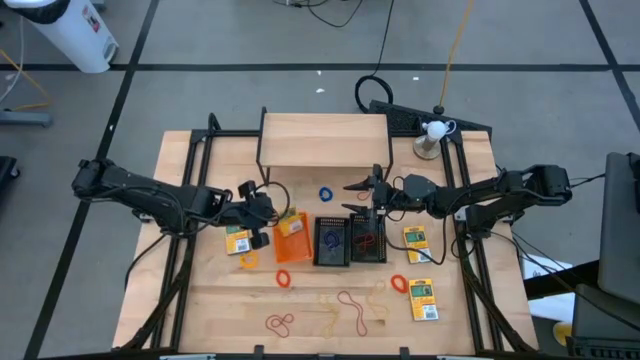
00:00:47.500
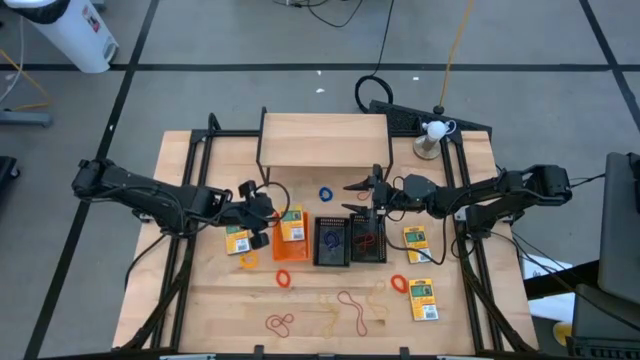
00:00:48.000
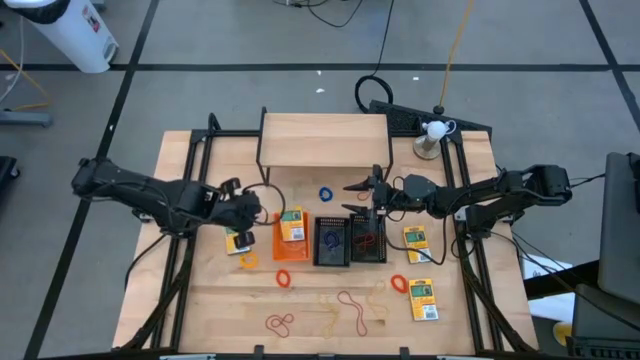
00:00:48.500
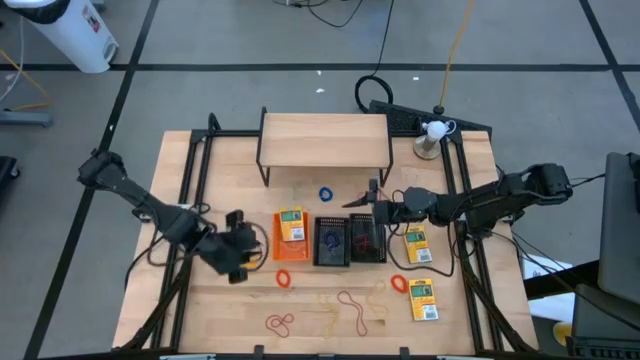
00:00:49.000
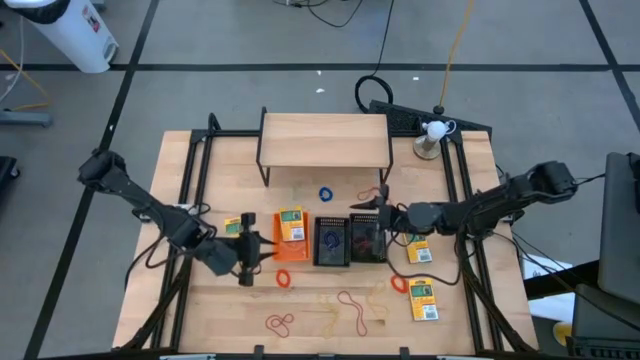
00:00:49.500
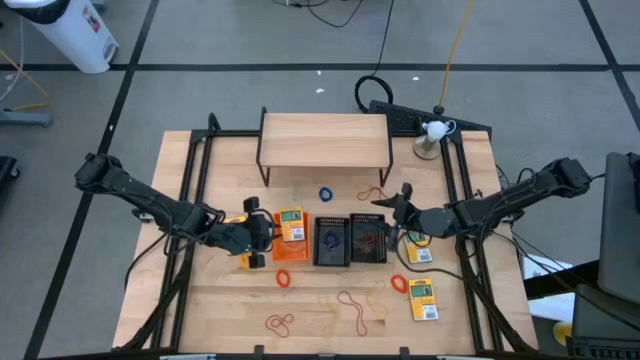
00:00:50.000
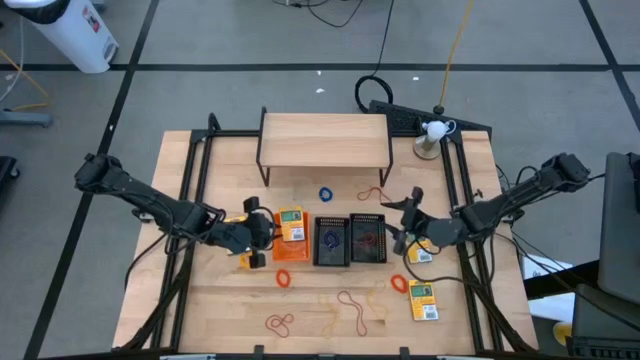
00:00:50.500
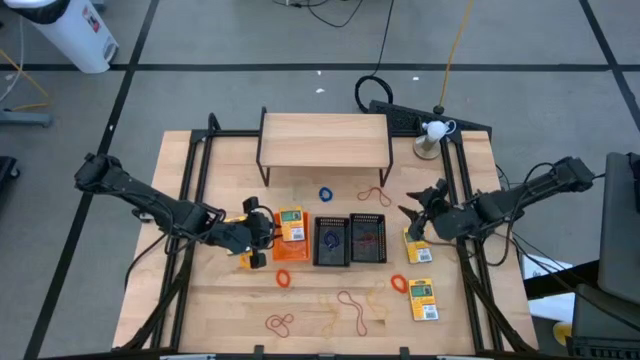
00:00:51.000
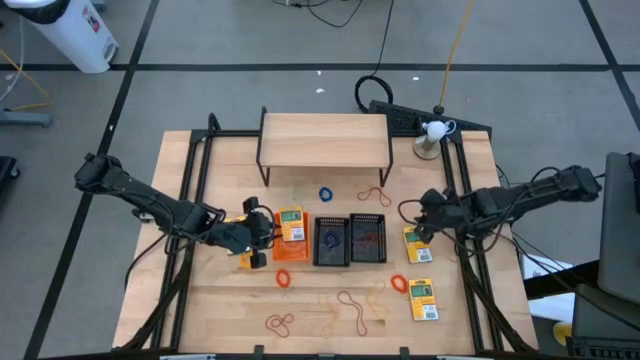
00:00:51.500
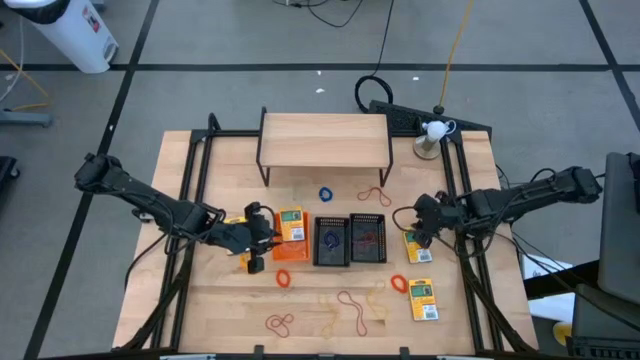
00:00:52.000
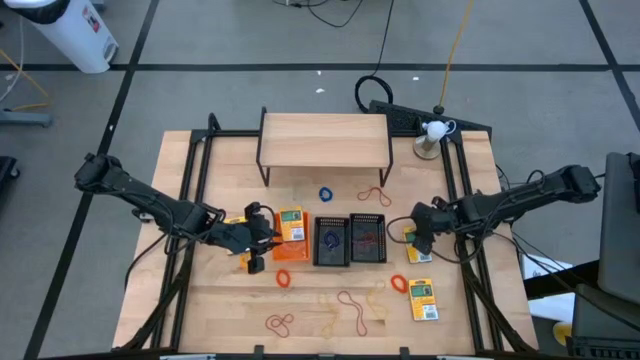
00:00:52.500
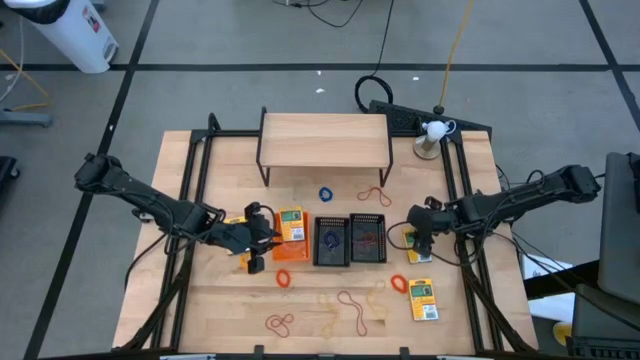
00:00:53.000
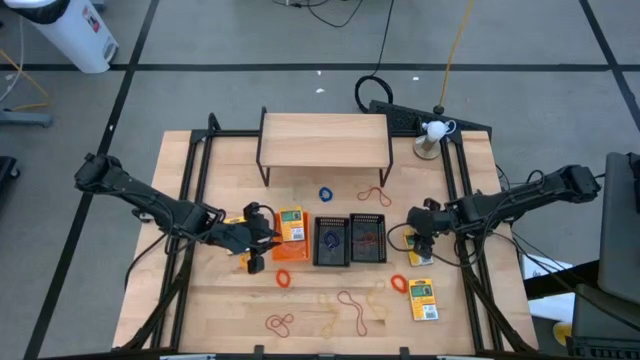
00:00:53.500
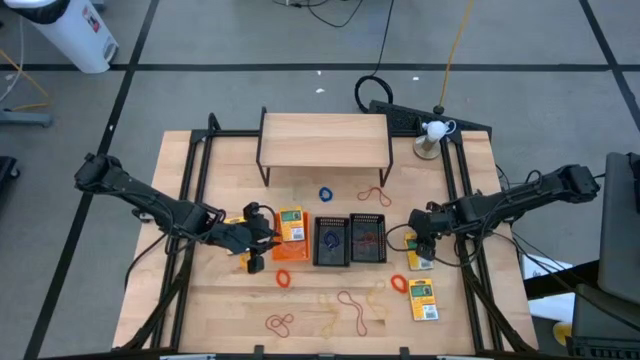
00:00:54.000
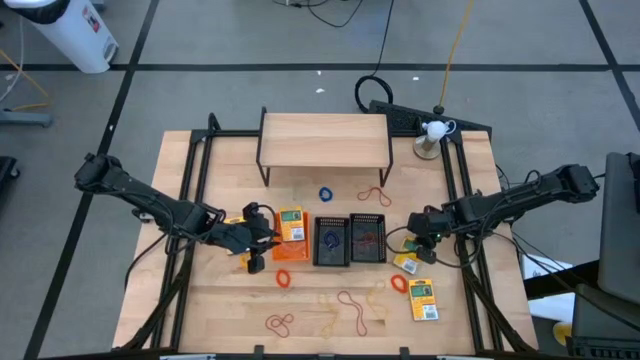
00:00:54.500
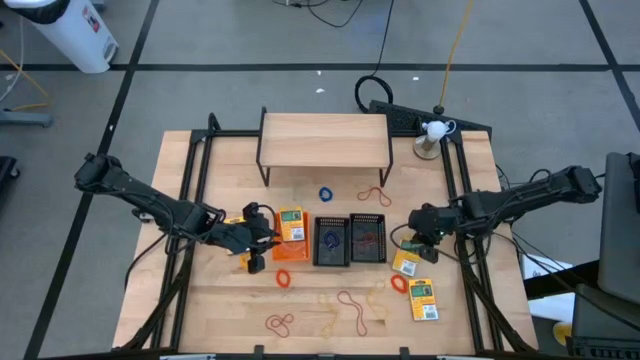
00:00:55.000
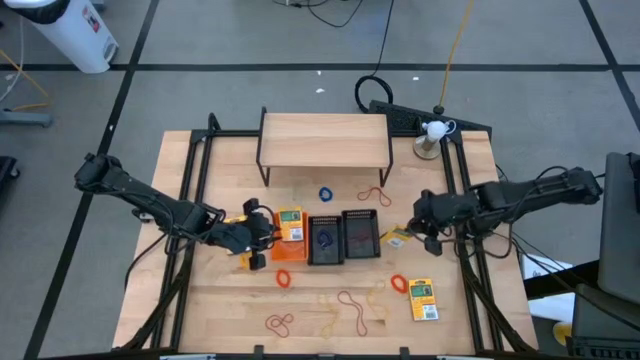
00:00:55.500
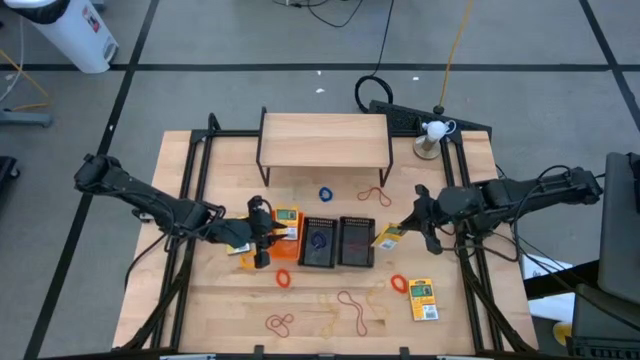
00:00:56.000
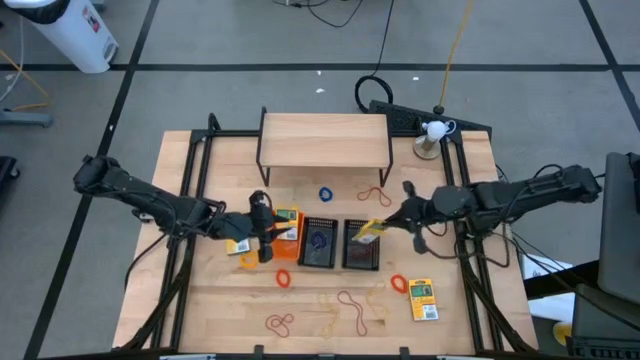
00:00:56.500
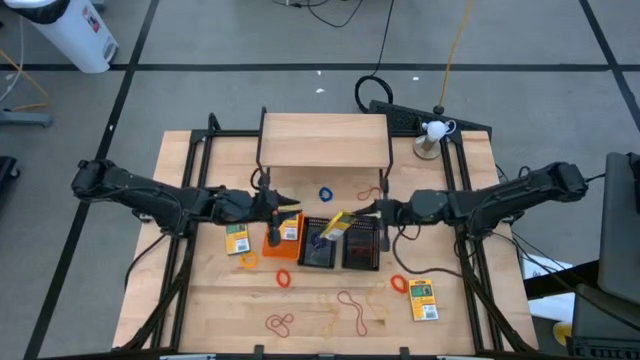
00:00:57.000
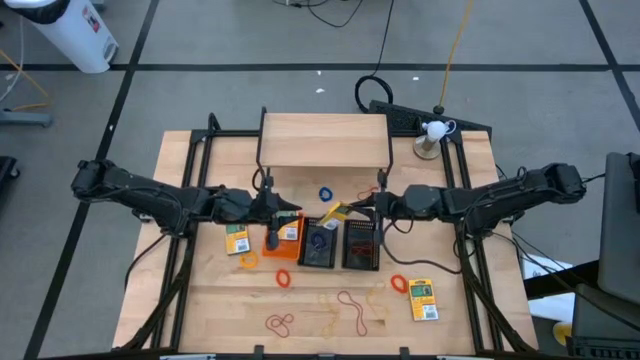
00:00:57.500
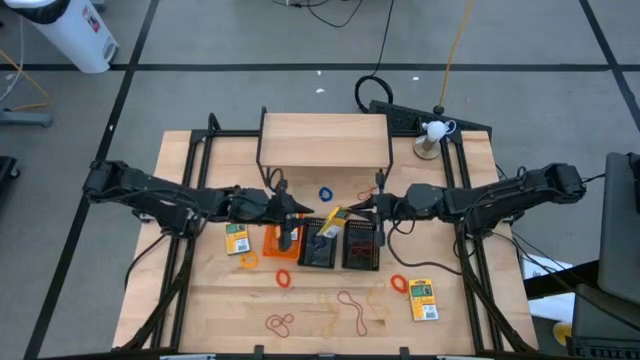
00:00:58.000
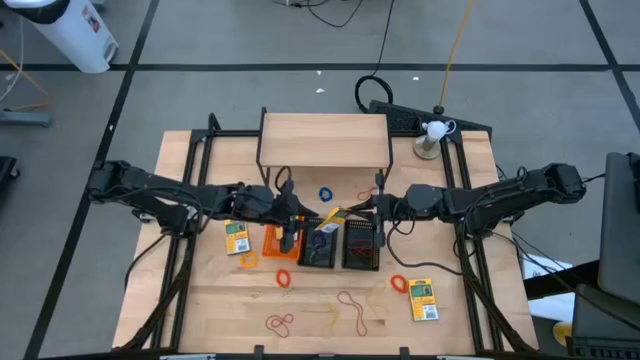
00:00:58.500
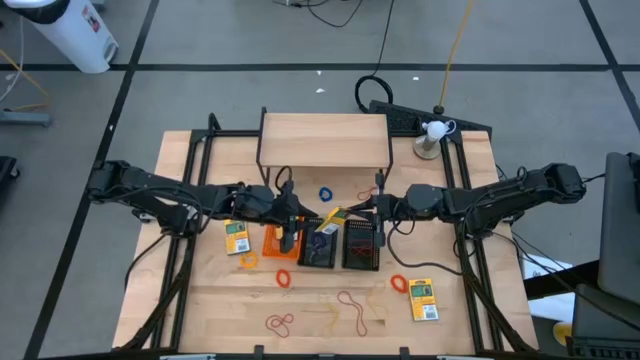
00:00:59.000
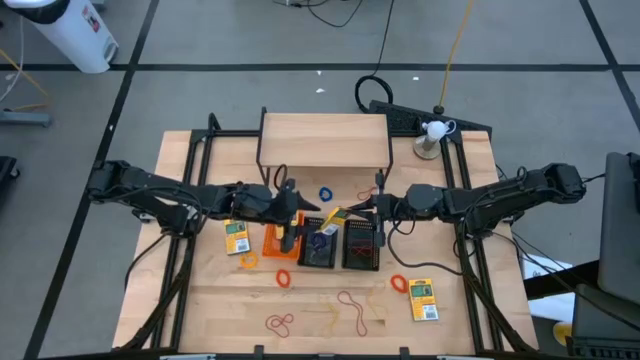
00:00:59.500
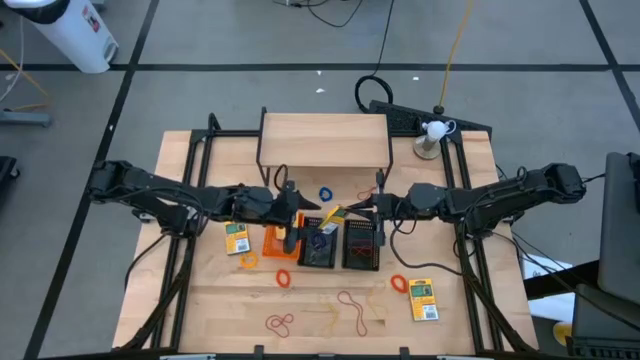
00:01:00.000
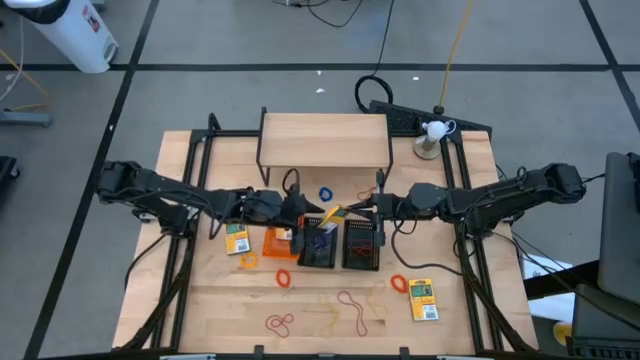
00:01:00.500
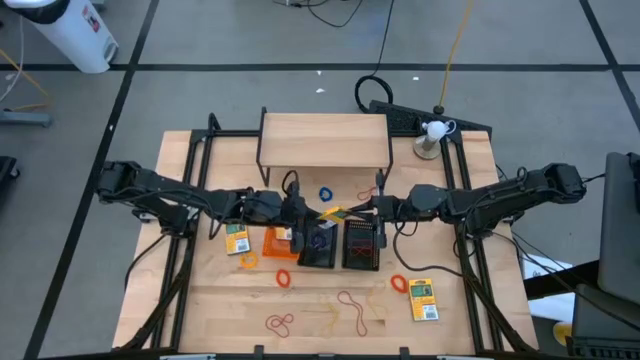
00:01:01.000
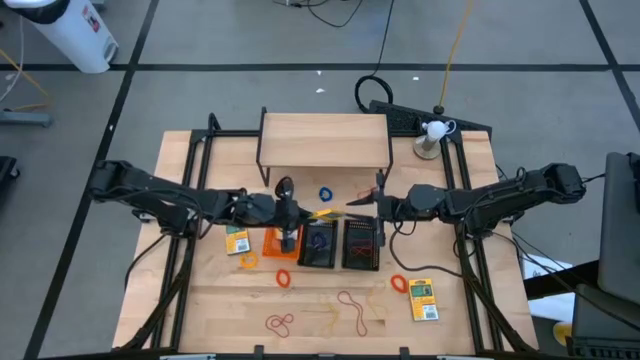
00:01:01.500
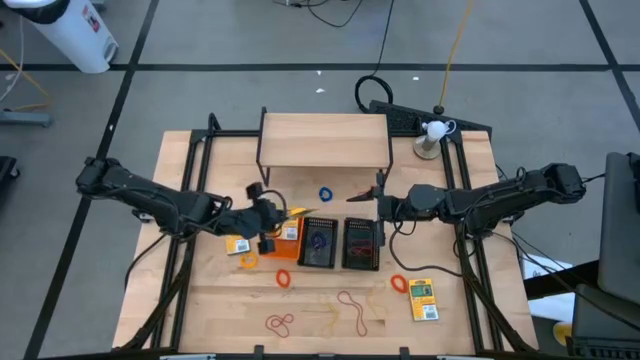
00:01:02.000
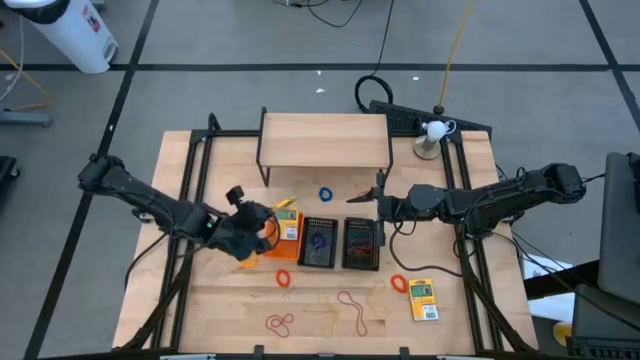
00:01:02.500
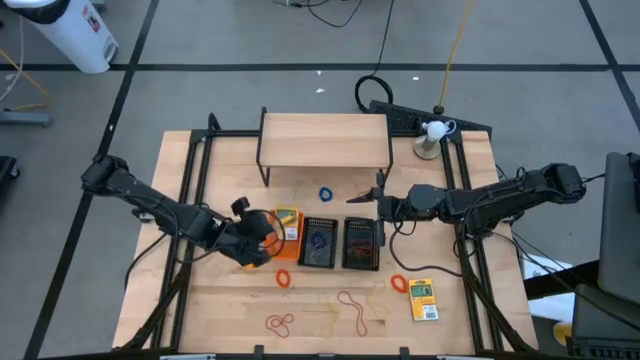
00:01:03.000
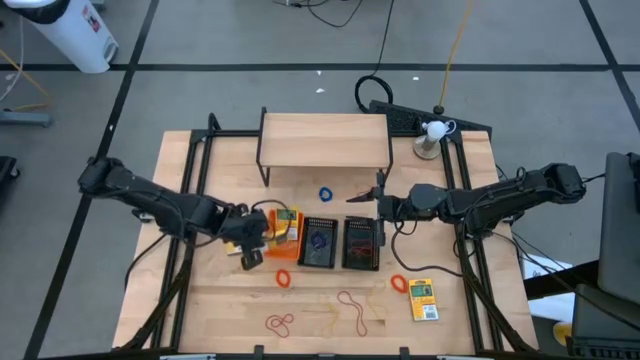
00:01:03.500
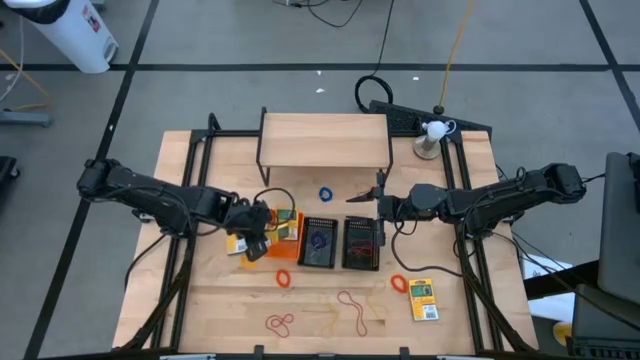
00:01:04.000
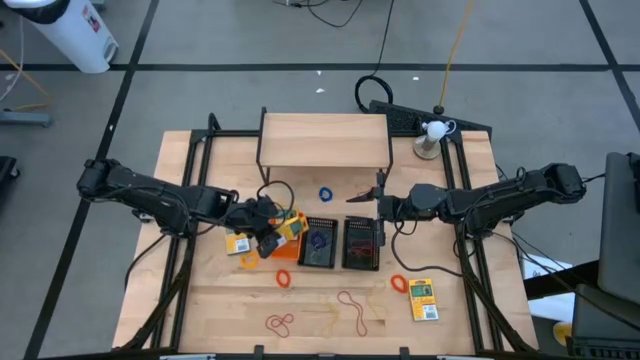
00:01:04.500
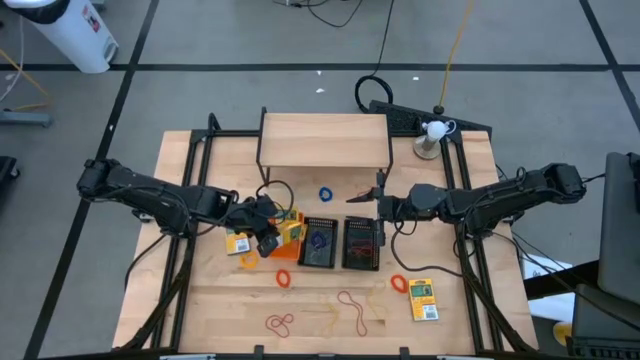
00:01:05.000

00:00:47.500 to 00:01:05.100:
Task: Pick & Place Office Desk Supplies
Put the crayons box into the orange bin

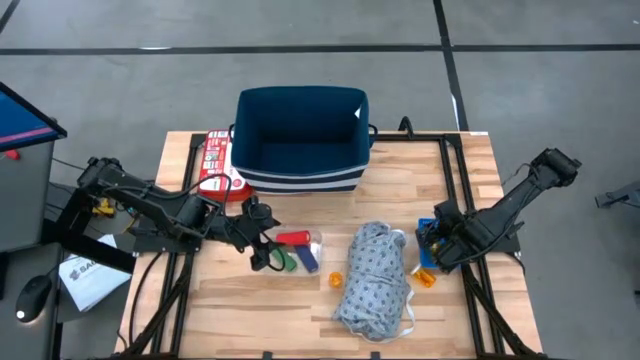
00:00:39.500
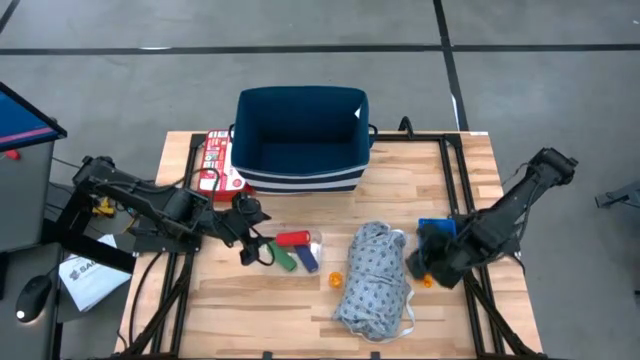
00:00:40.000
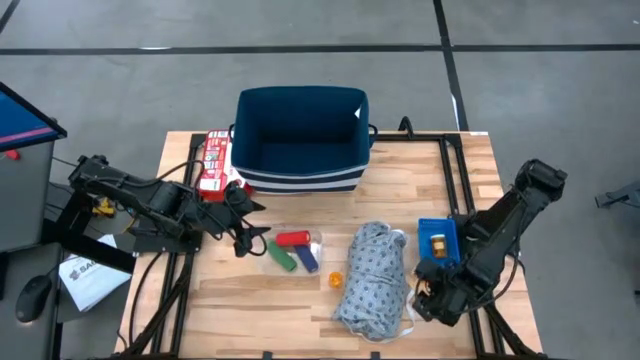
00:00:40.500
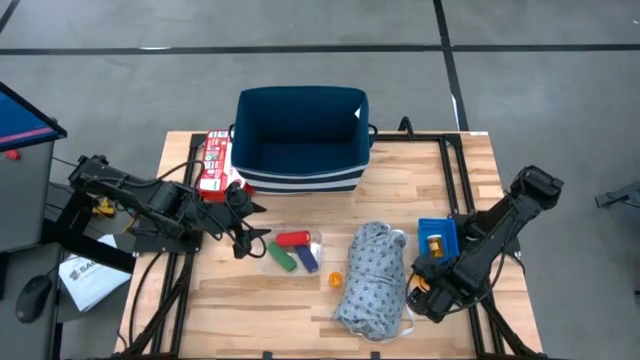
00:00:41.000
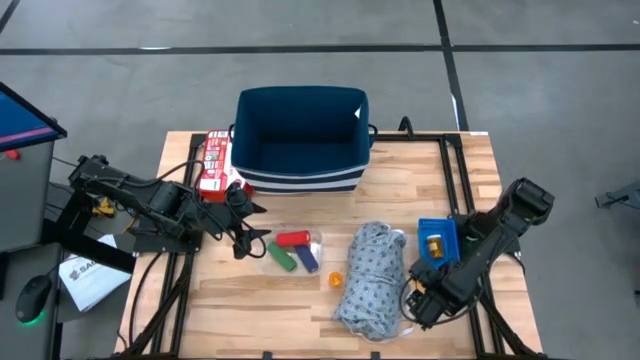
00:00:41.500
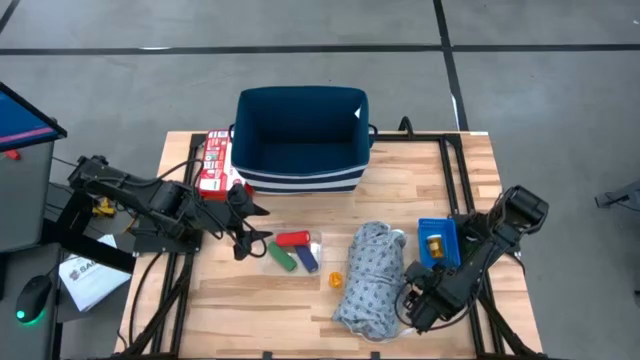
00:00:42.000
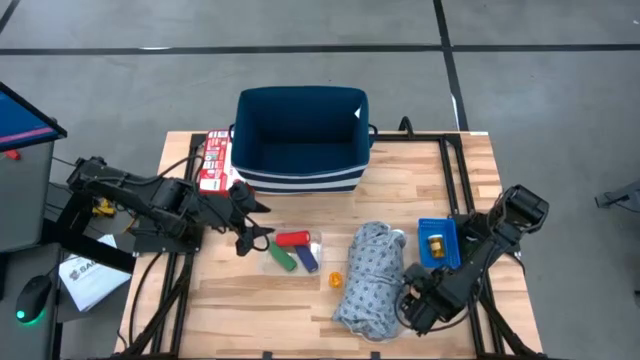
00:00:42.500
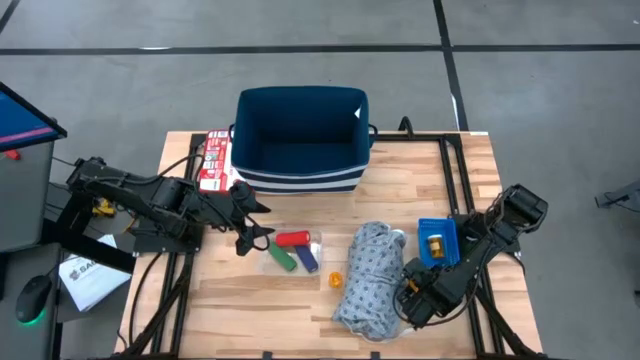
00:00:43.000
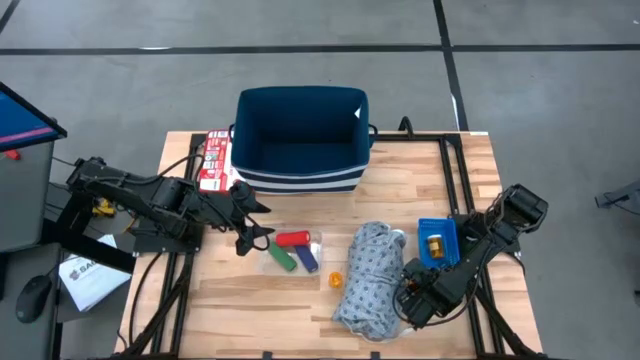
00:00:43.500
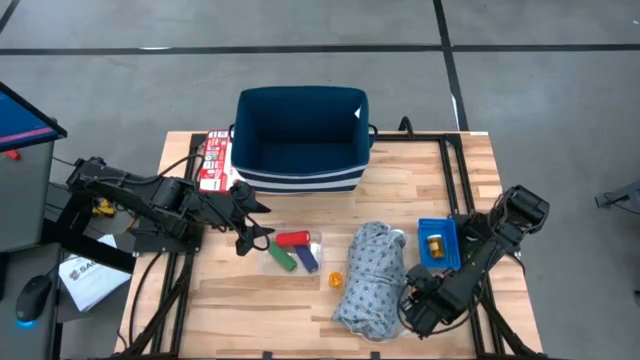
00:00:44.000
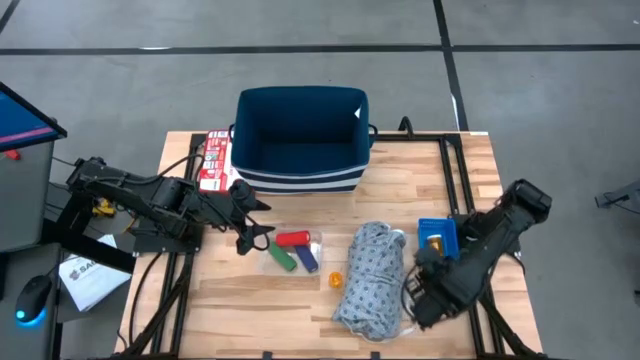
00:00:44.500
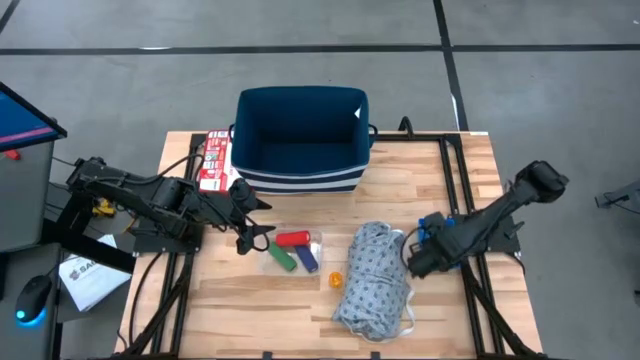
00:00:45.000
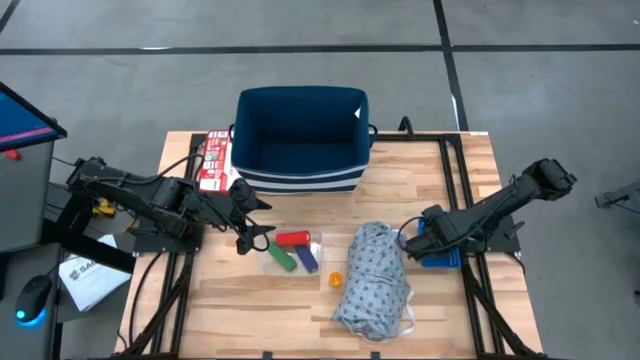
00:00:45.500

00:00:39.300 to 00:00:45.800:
Task: Pick & place medical supplies in basket/bin
Put the right orange pill bottle into the small blue bin
